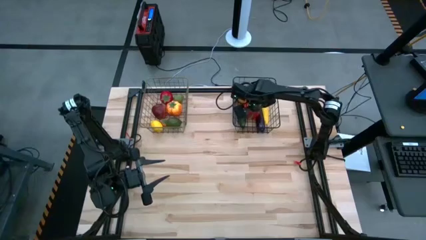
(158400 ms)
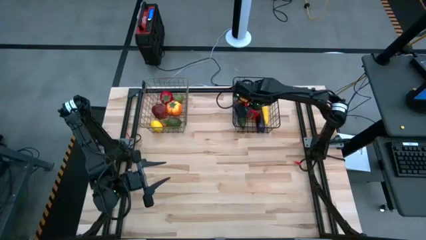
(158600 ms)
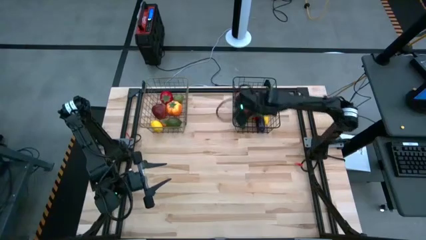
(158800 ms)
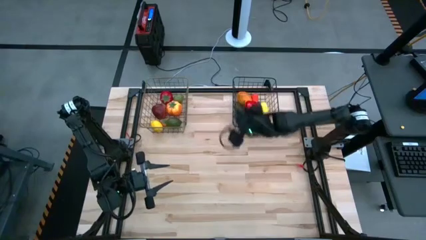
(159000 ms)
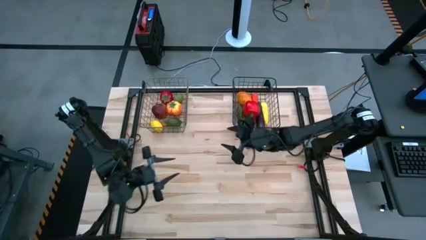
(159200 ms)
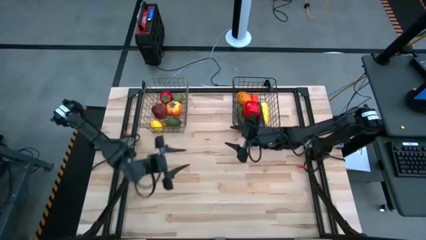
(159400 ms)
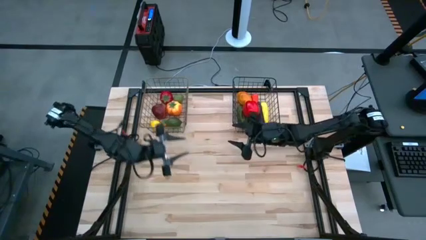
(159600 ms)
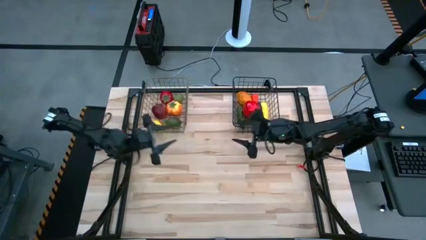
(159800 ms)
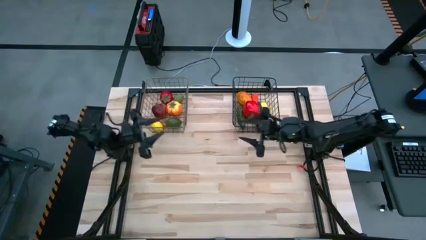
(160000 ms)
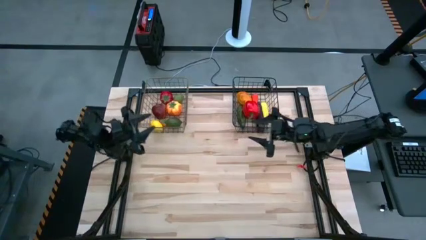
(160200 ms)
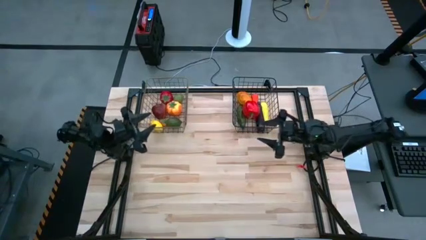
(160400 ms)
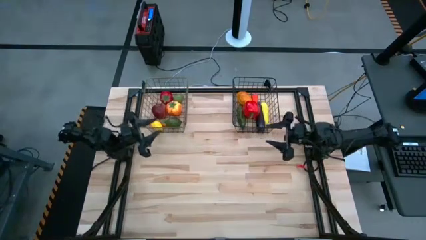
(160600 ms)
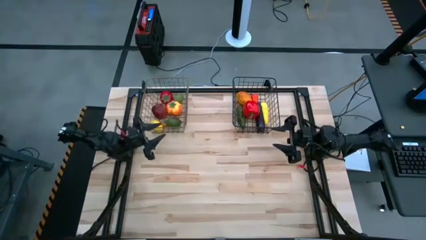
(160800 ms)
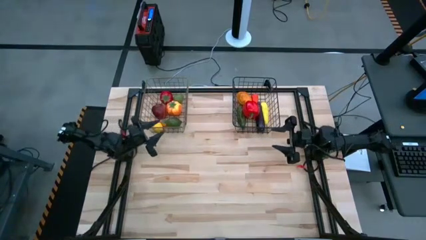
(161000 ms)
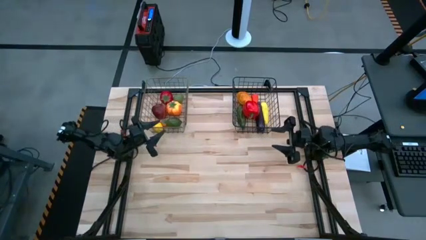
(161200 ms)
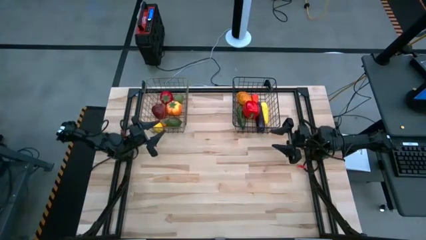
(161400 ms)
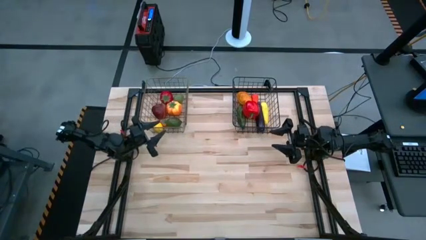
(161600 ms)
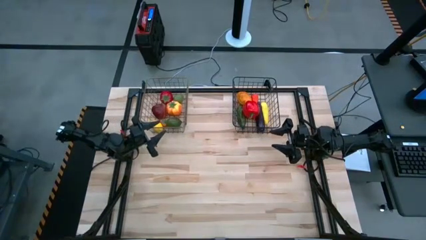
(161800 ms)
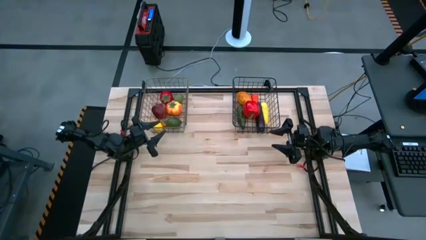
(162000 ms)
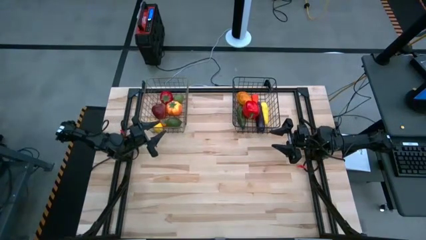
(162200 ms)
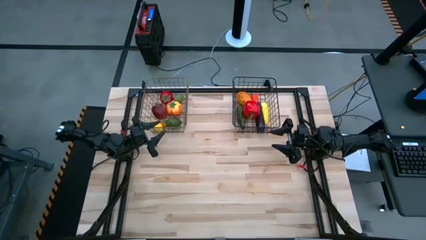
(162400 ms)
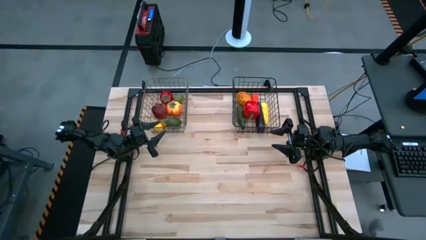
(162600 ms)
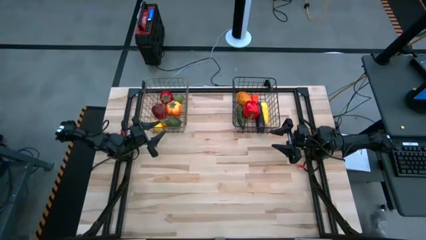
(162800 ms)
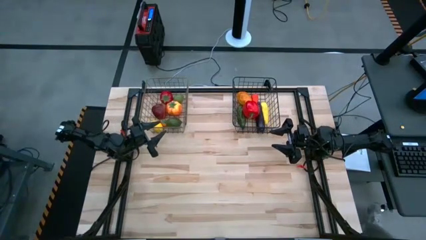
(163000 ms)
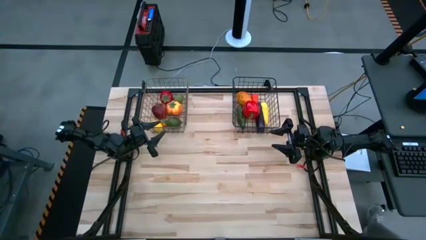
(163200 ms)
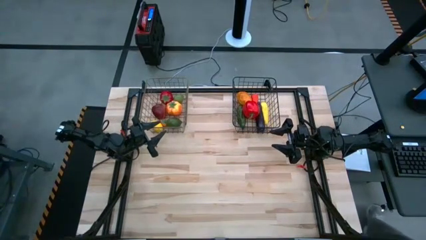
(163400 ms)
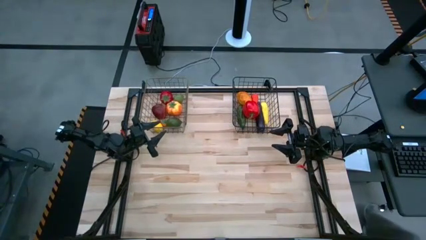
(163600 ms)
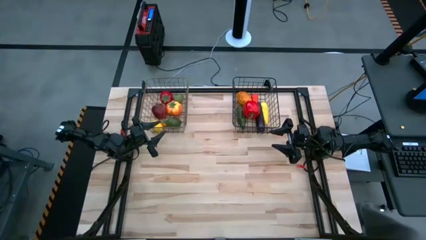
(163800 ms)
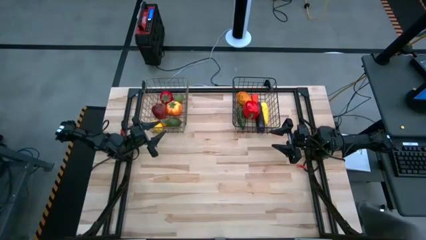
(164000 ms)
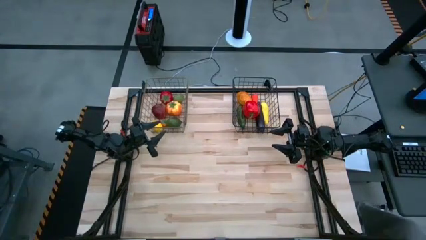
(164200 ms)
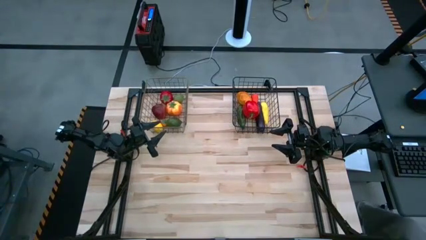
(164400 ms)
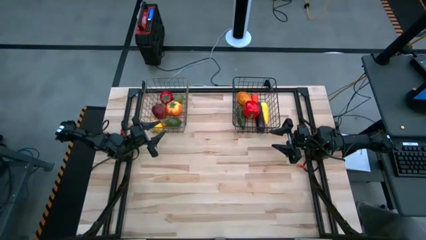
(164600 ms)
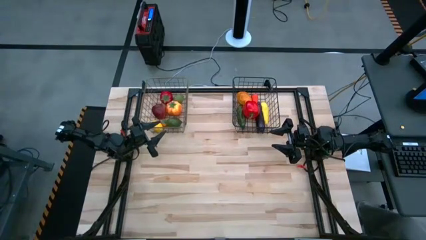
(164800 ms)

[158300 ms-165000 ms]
Task: Sort produce into baskets
Return to Home Position

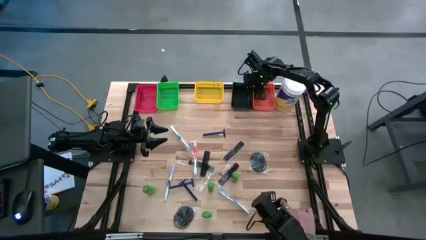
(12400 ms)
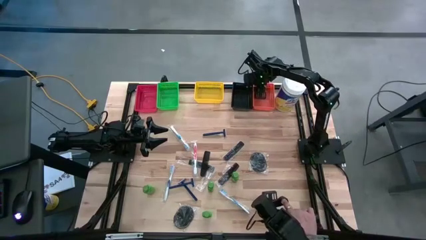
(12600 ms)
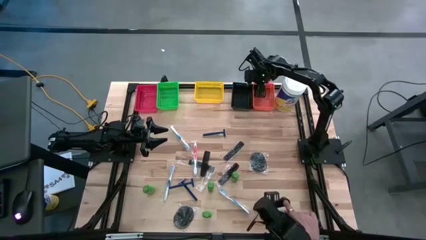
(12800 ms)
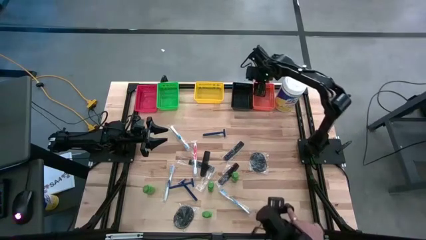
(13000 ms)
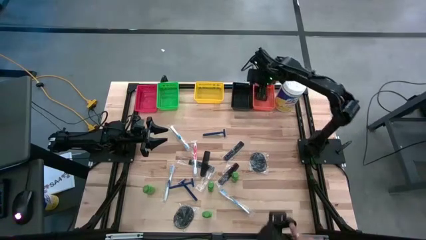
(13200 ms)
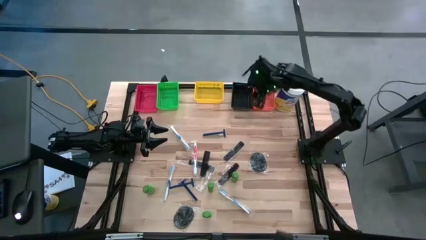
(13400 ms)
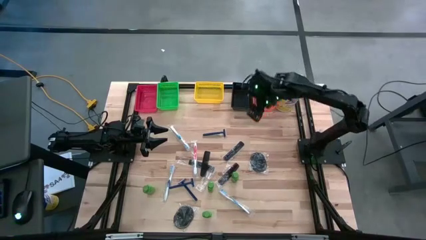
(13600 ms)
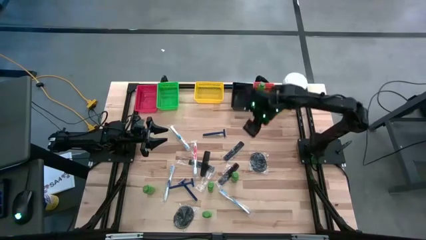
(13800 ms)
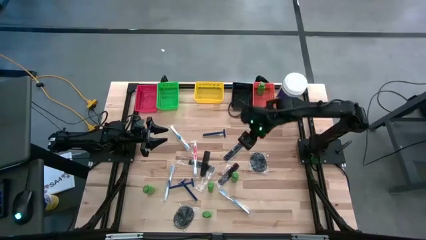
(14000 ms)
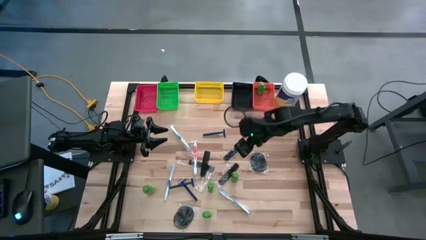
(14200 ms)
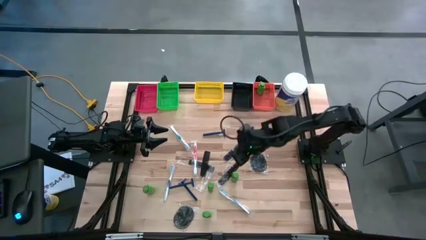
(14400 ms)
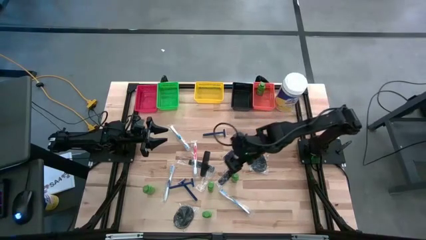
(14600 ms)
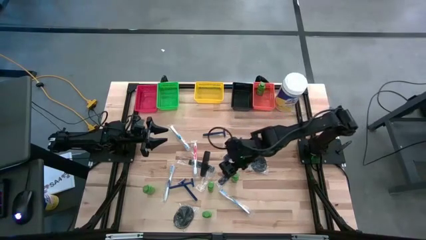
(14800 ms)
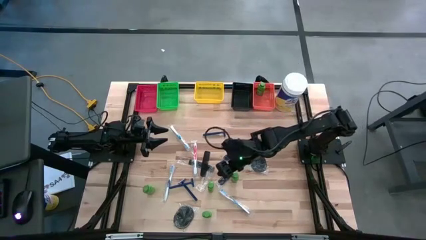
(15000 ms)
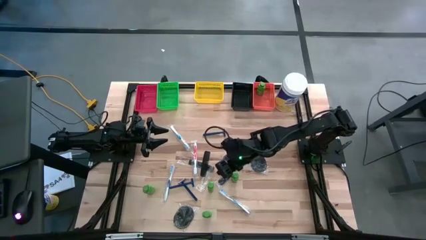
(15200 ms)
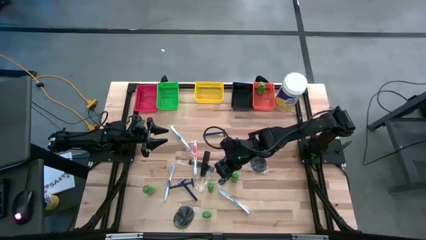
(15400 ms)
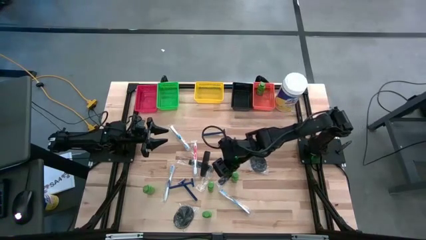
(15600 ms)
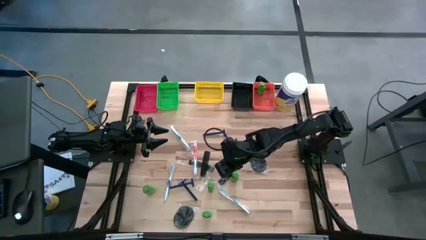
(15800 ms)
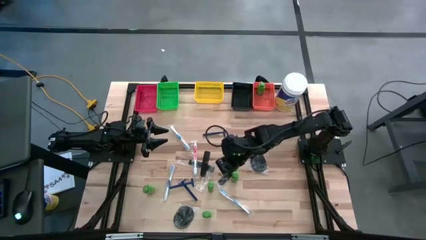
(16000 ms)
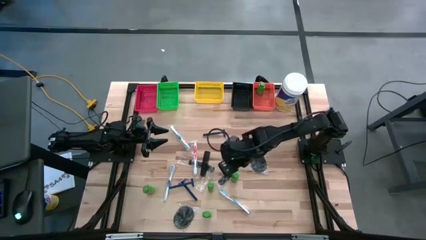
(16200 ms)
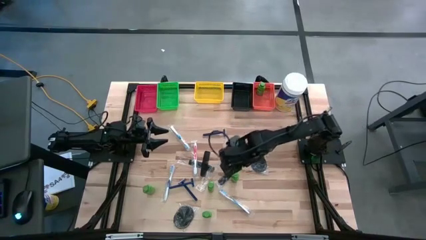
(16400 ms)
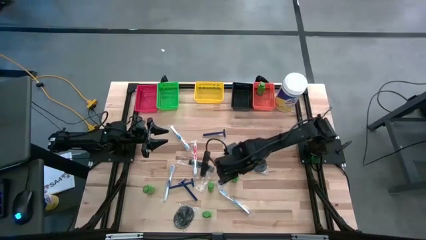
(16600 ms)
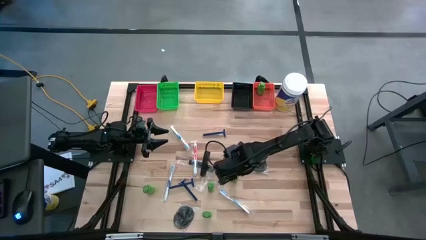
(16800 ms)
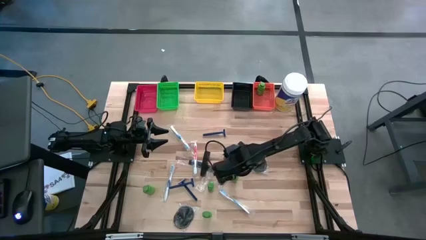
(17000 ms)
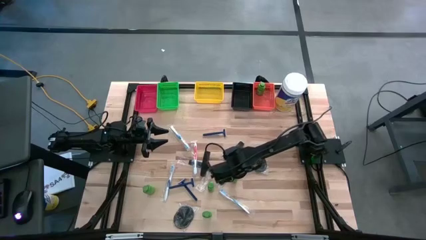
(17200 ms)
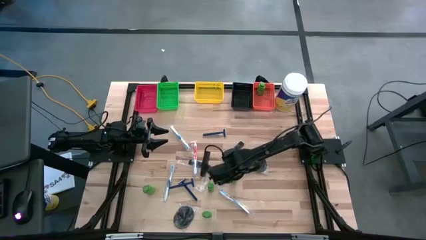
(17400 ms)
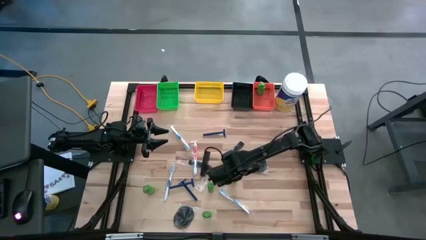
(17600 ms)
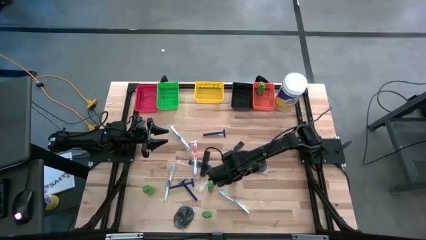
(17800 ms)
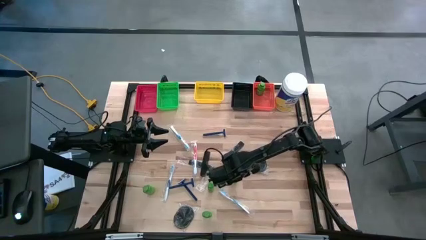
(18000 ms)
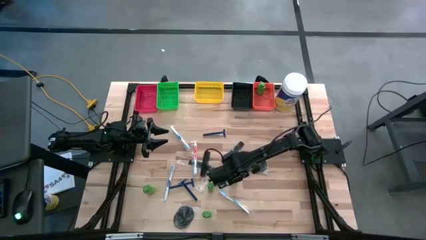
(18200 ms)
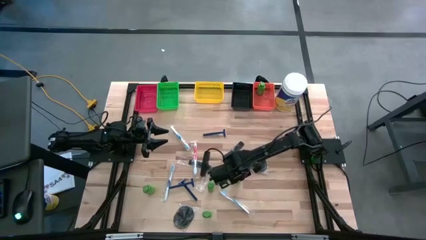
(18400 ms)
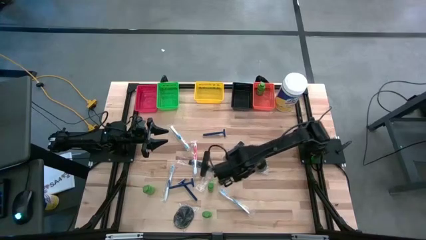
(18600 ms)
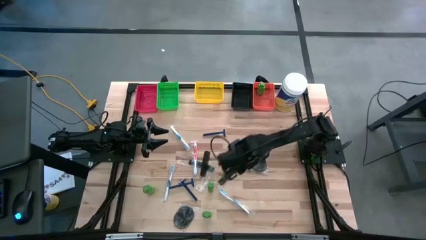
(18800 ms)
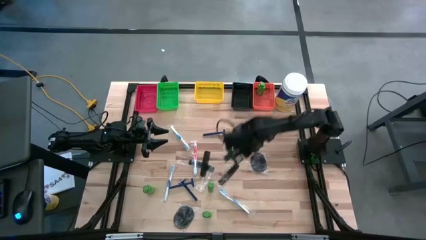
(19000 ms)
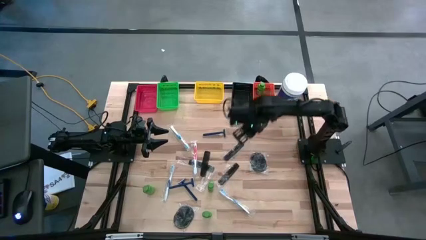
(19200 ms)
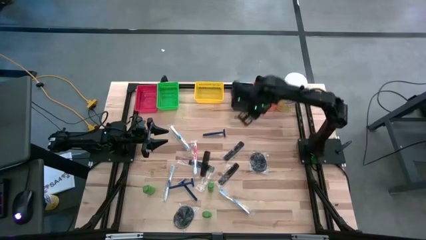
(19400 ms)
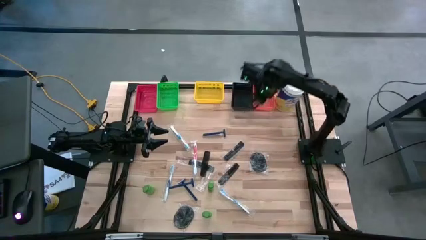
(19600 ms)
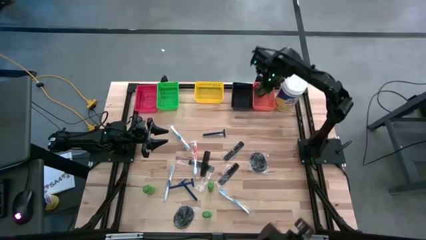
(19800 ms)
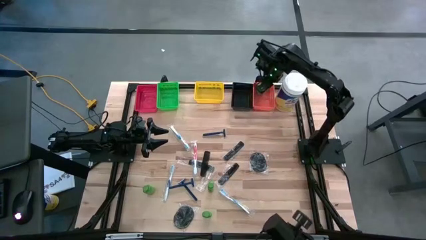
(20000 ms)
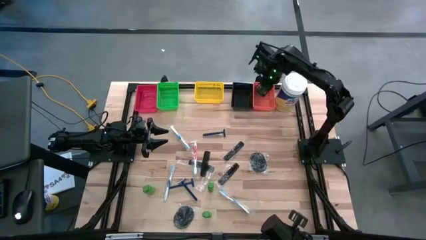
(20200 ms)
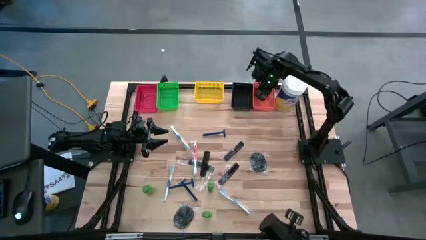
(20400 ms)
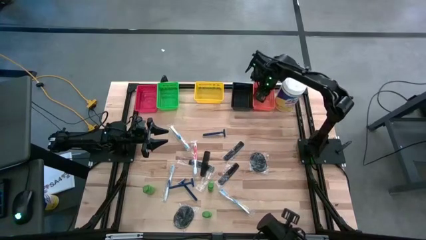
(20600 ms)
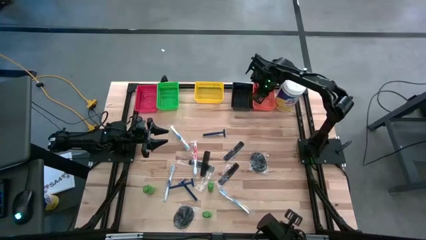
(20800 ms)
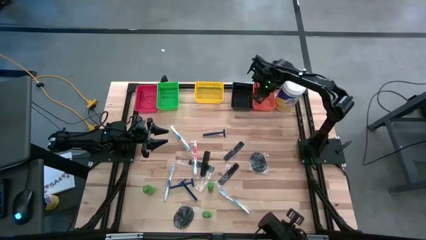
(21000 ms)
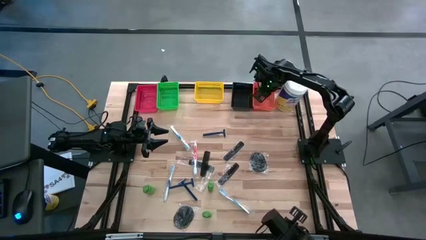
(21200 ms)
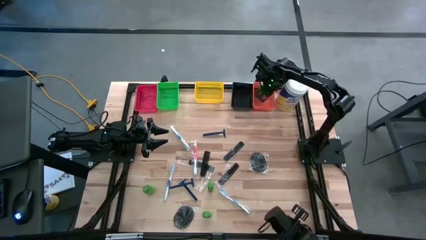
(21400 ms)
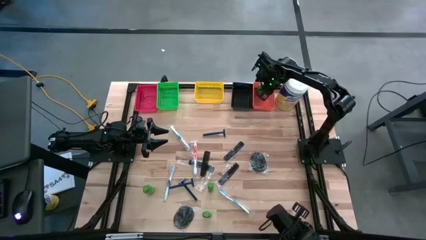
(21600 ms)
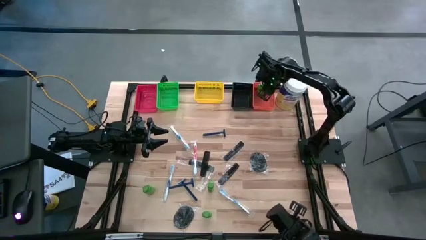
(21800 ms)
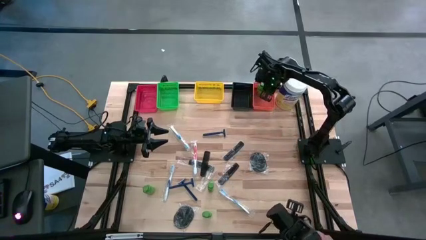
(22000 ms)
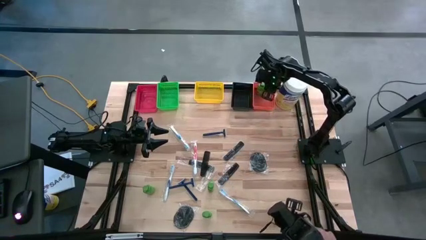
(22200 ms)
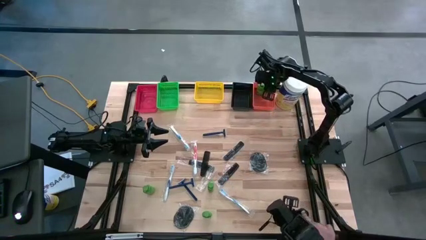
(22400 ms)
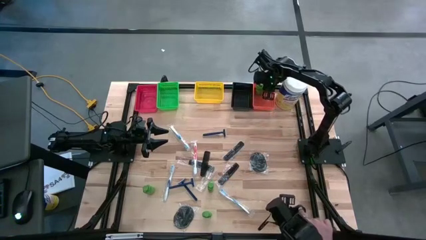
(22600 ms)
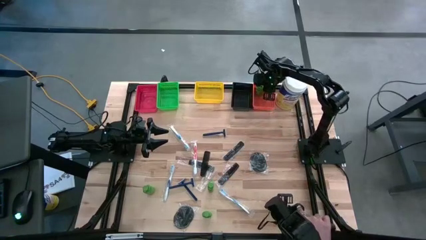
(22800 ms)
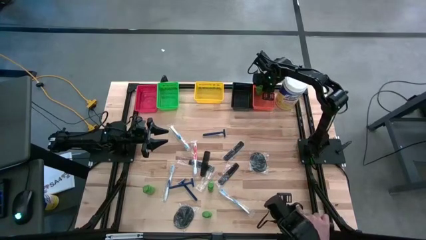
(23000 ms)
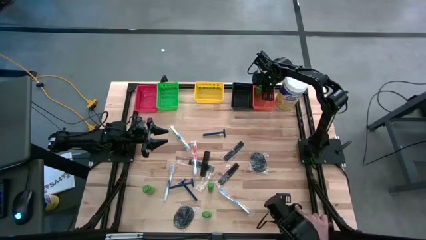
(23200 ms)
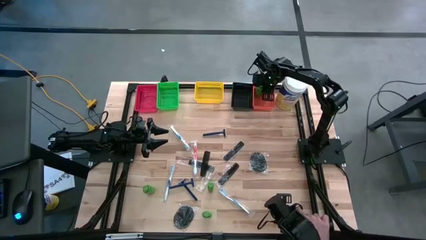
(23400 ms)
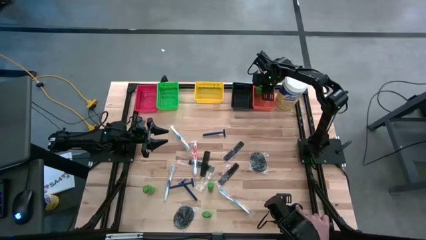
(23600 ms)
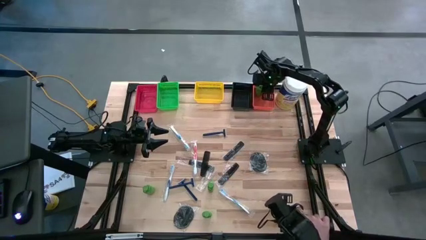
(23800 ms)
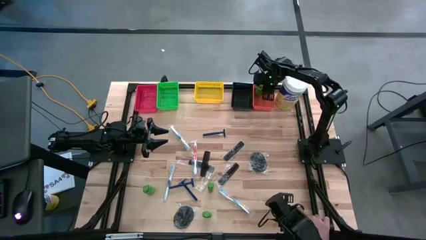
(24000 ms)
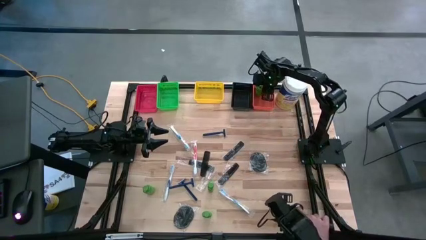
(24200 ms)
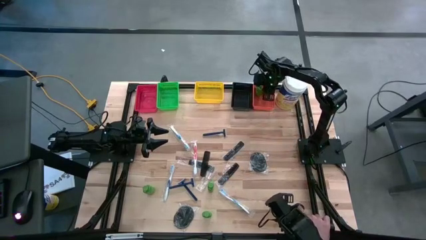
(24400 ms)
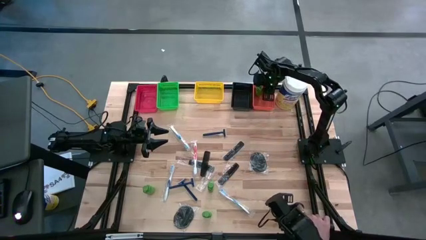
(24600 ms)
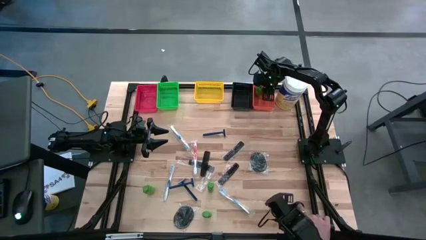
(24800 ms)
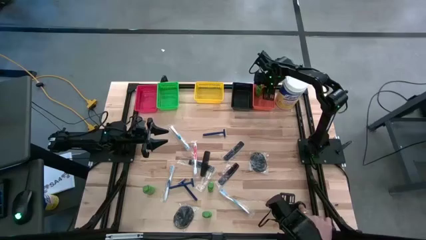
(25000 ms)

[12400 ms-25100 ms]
Task: Pick & Place Travel size toiletries
Put the green shampoo bottle into the orange bin
